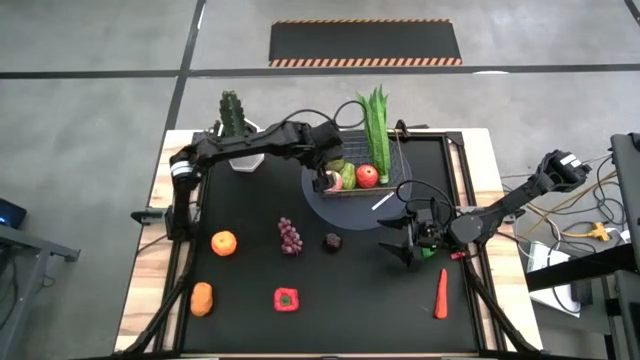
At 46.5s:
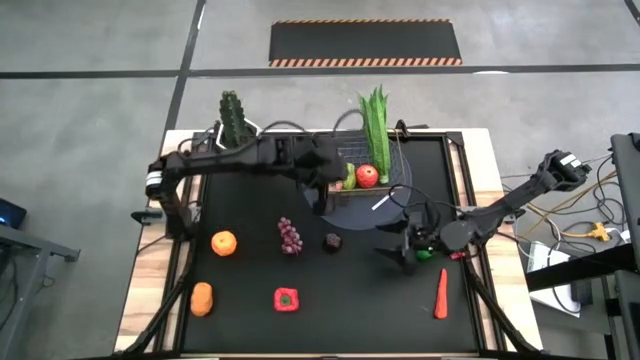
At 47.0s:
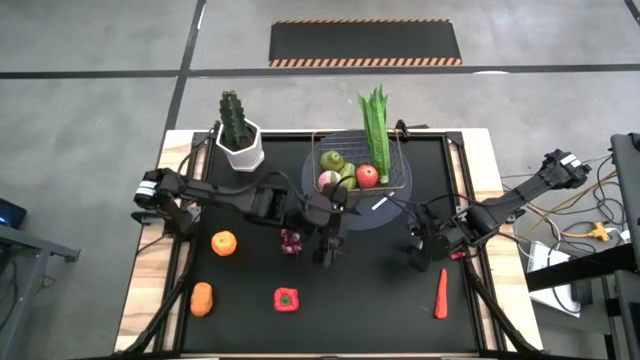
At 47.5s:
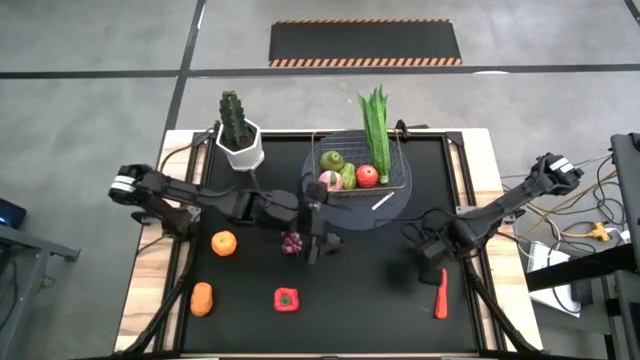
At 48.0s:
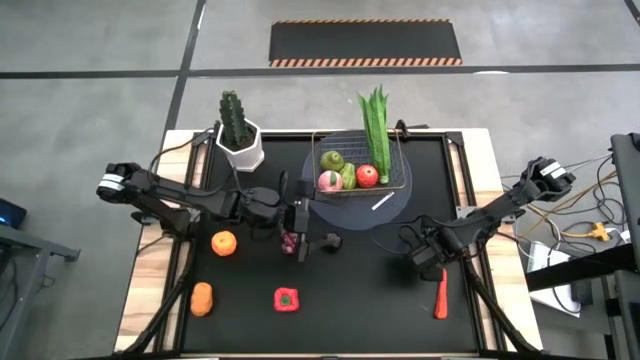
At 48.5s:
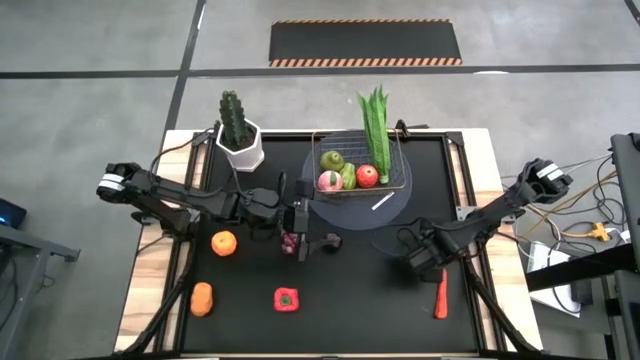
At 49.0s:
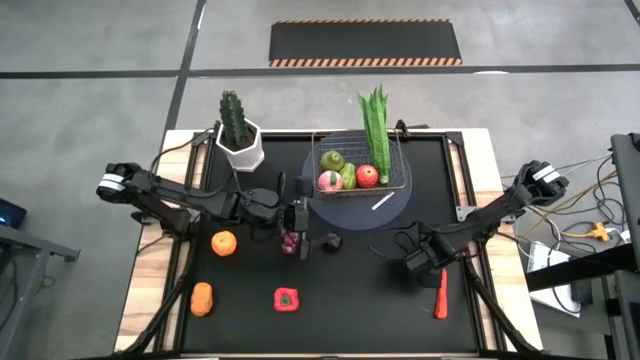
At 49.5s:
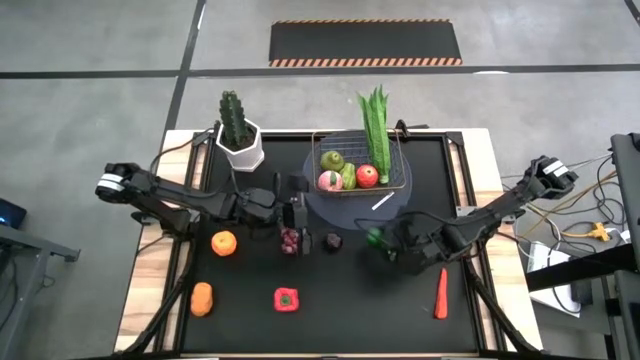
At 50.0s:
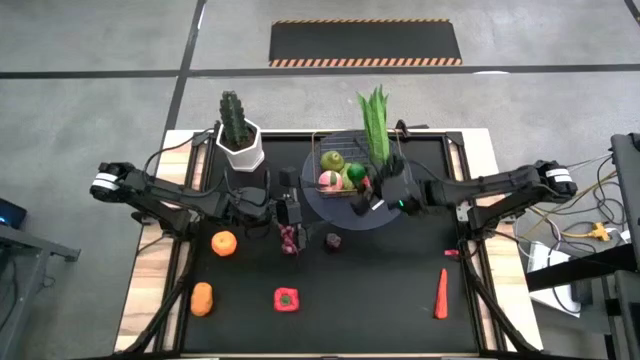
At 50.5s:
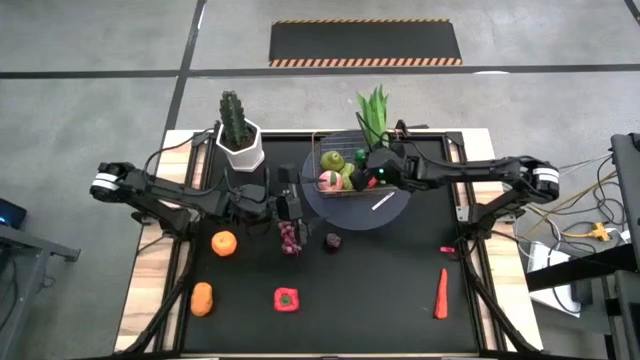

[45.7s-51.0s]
Task: Build produce basket
Put the green lime into the gold wire basket

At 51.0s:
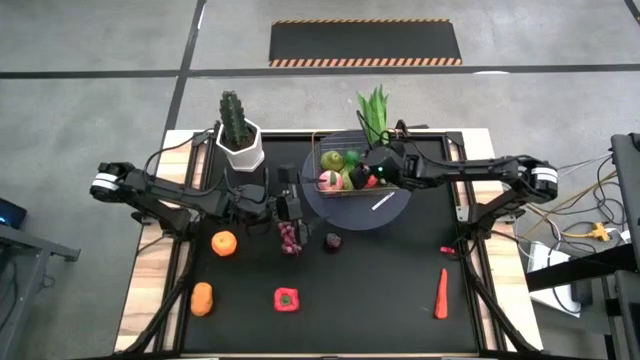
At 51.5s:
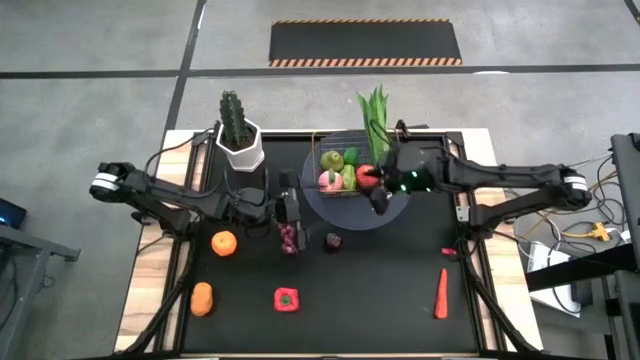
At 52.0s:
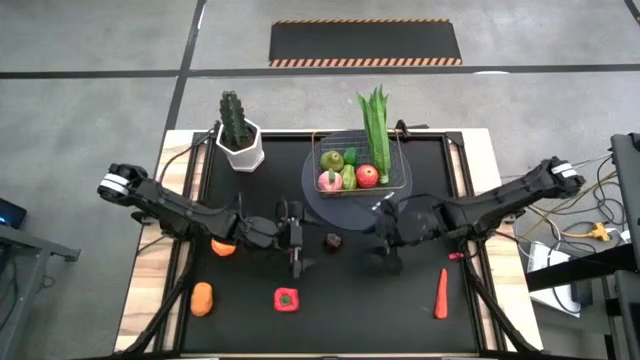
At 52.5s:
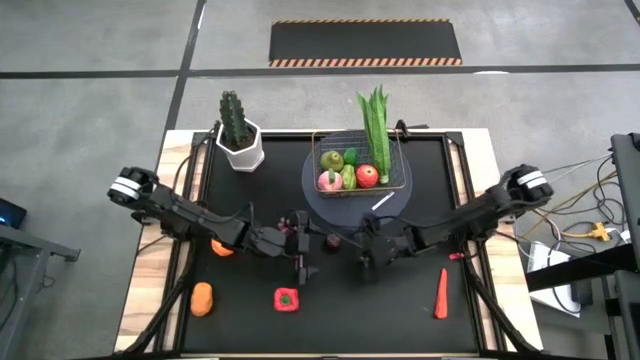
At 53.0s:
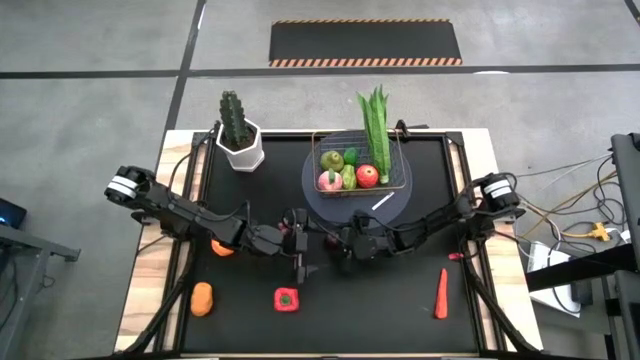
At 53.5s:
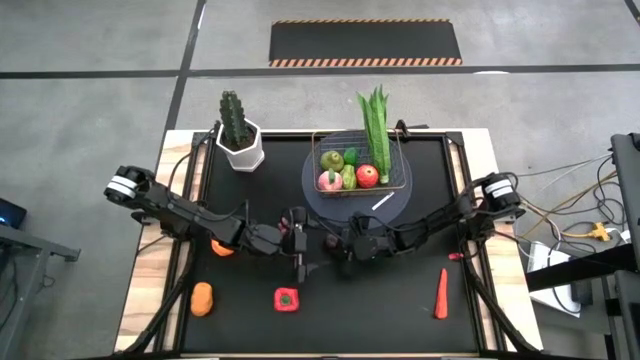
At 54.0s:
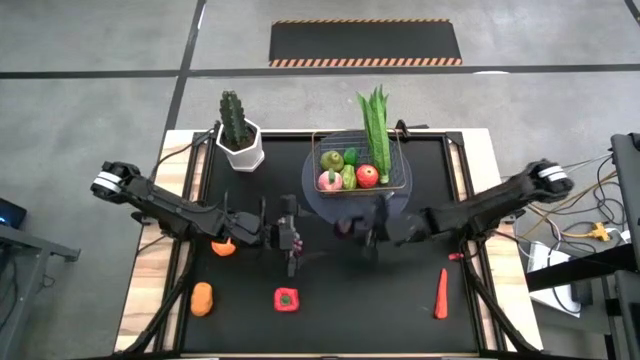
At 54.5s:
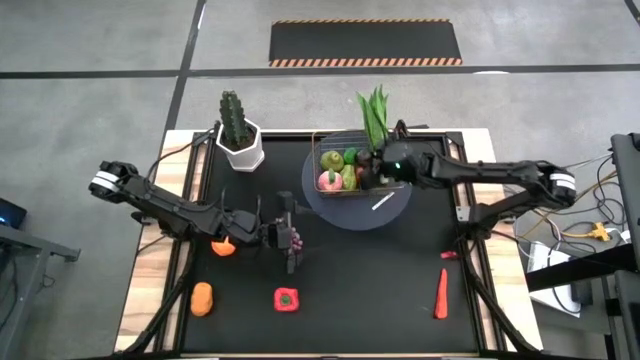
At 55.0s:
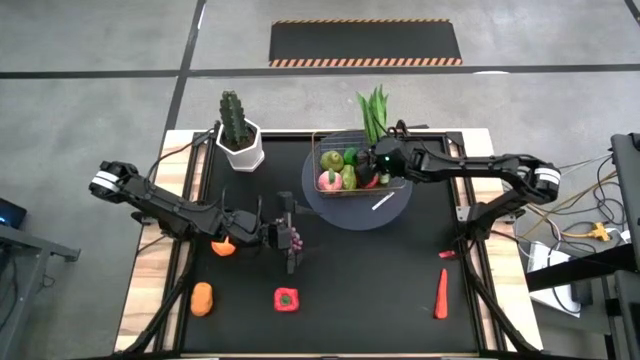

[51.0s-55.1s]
Put the dark red apple into the gold wire basket

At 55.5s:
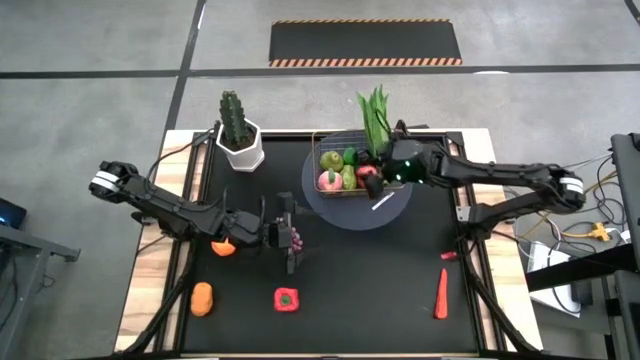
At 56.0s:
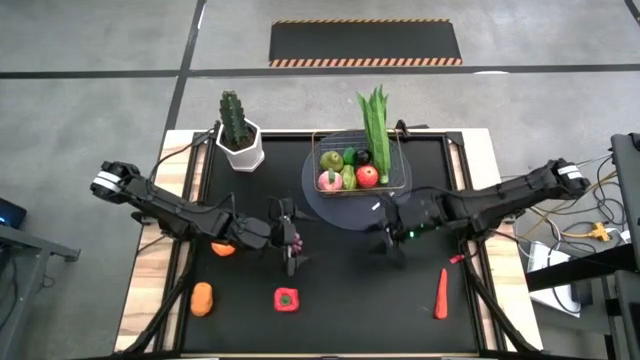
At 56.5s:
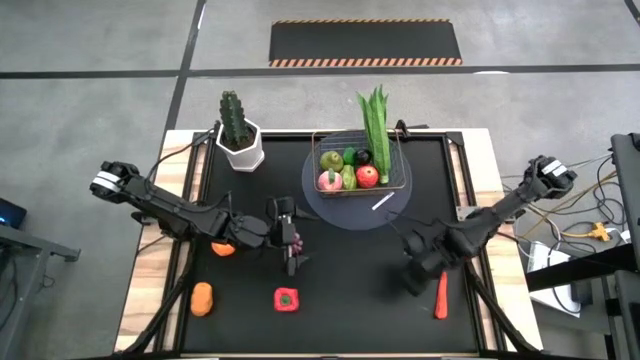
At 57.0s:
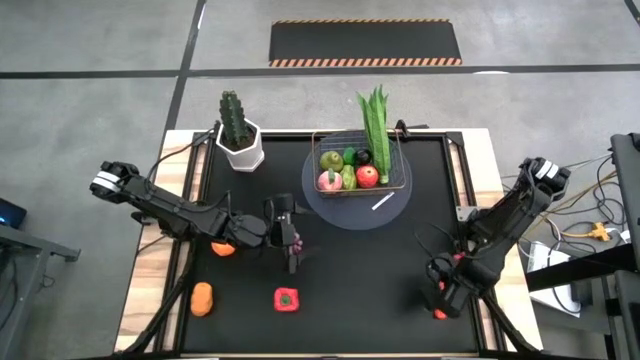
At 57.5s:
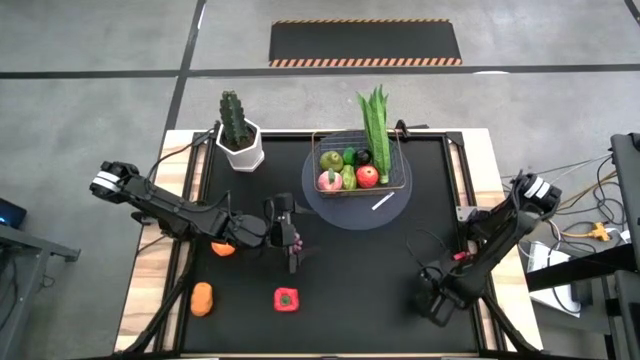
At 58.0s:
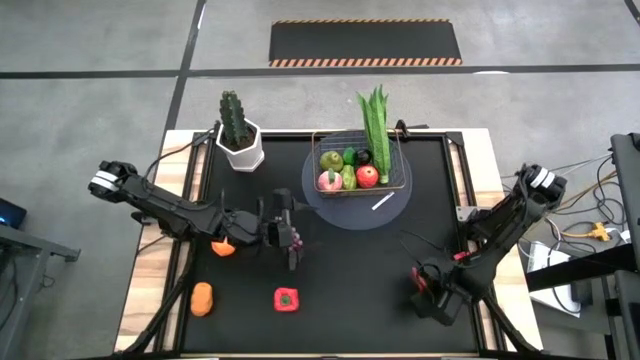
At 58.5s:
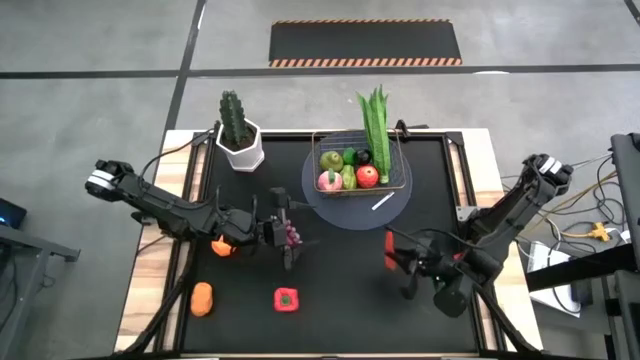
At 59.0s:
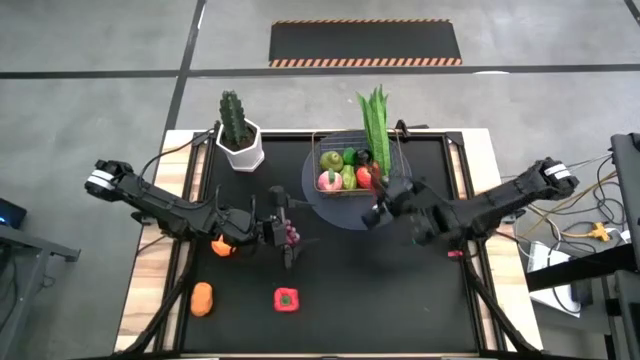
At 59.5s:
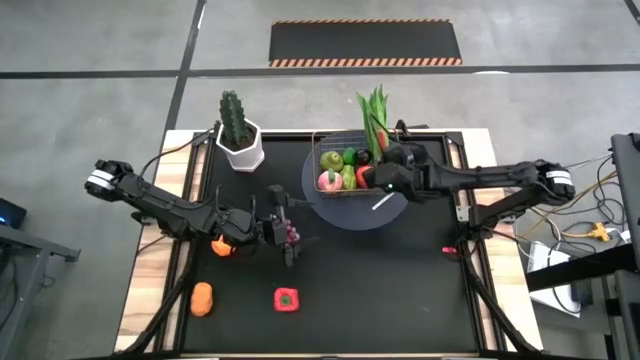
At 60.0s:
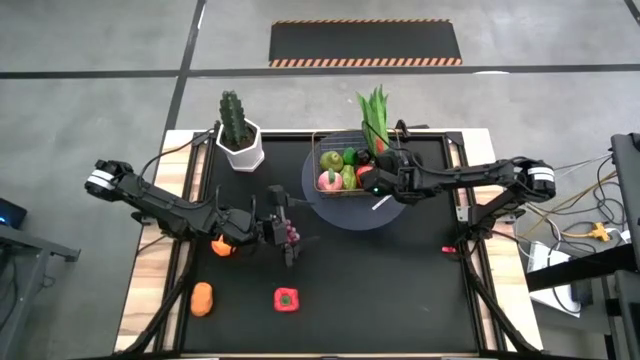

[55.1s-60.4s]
Put the orange carrot into the gold wire basket

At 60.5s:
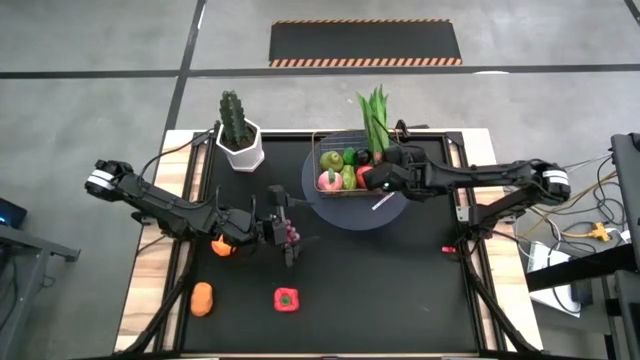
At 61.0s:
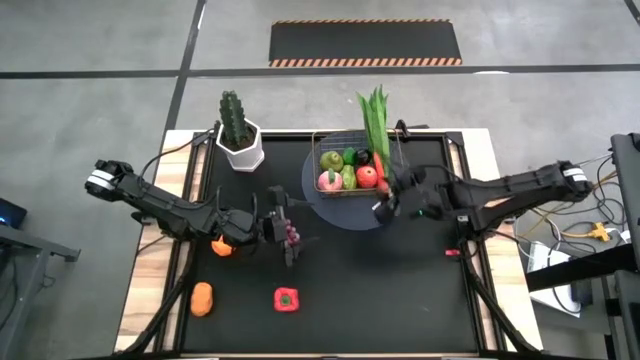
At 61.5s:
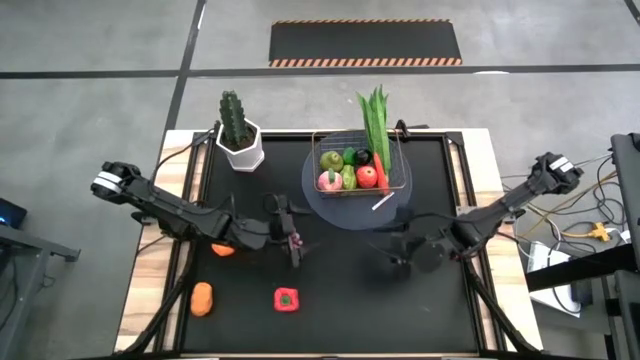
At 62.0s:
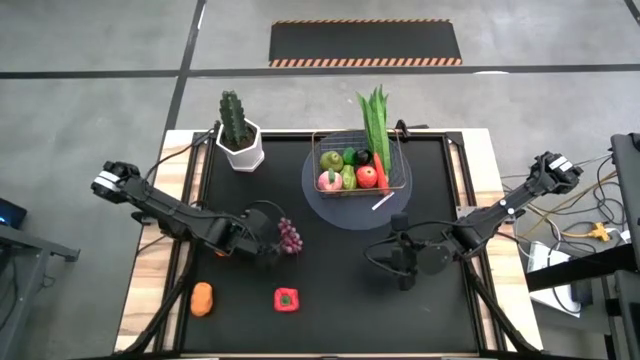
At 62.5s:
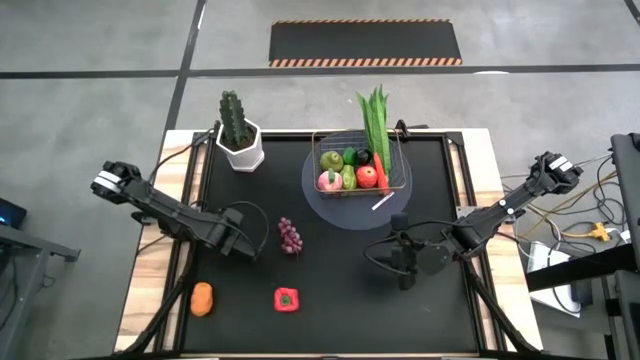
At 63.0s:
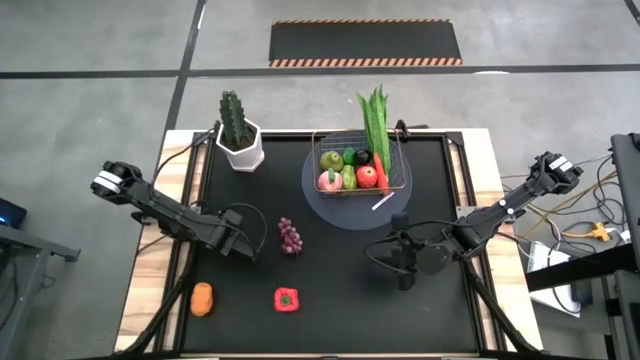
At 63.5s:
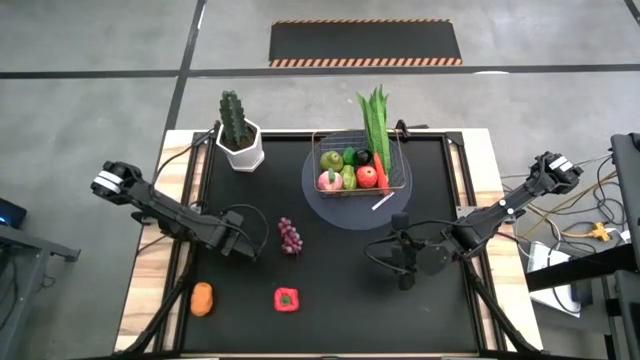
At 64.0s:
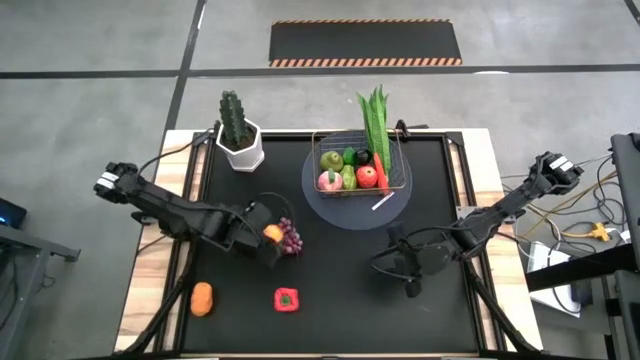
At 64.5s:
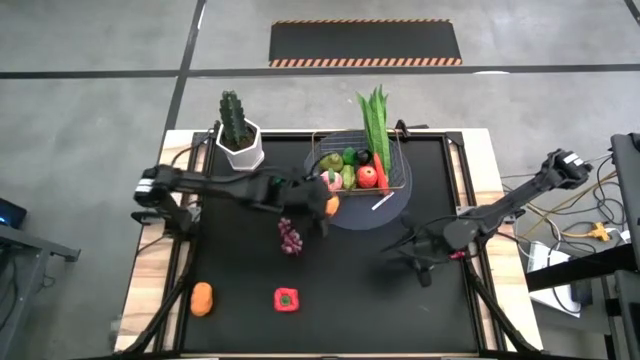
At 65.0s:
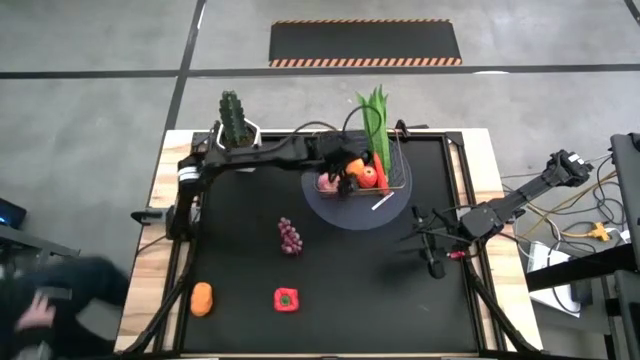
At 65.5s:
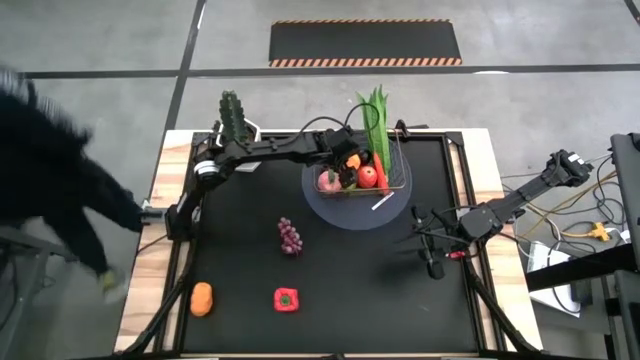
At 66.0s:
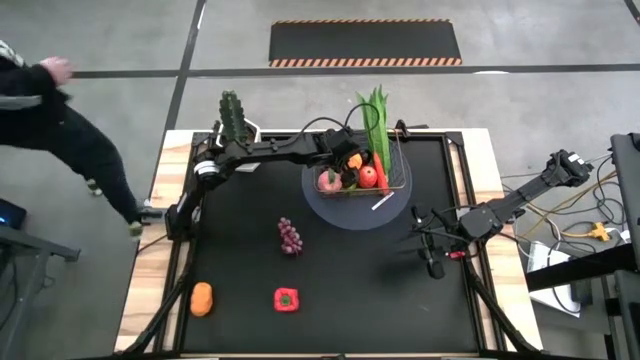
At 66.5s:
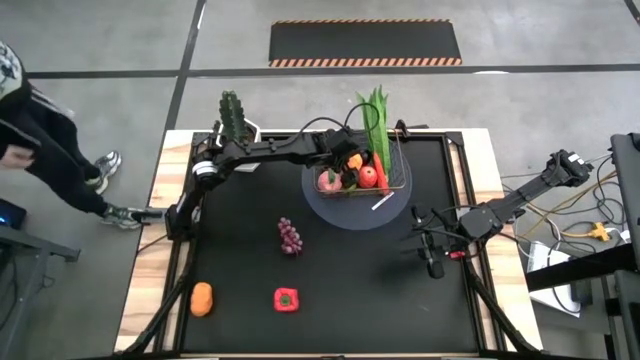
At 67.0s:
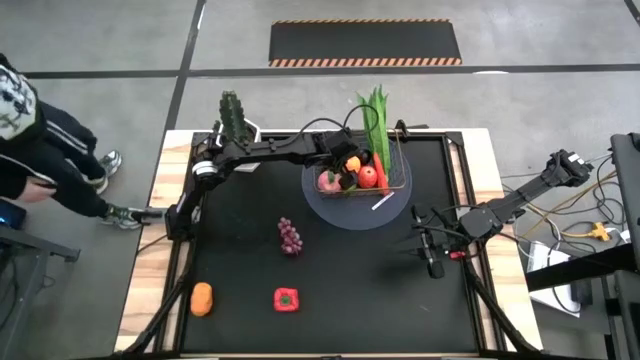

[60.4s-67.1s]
Put the orange into the gold wire basket
